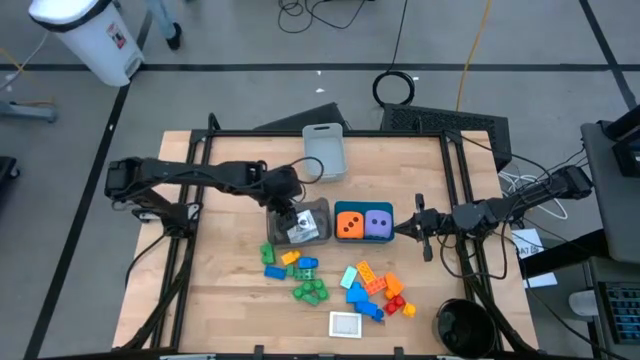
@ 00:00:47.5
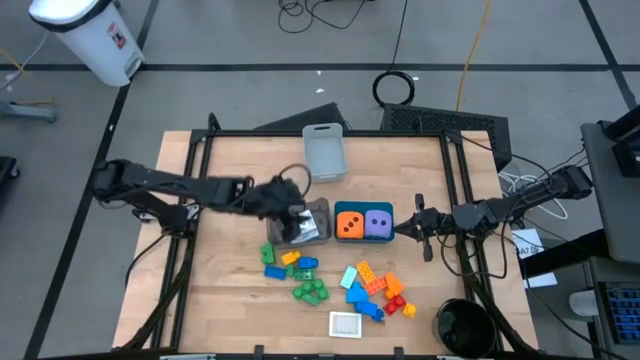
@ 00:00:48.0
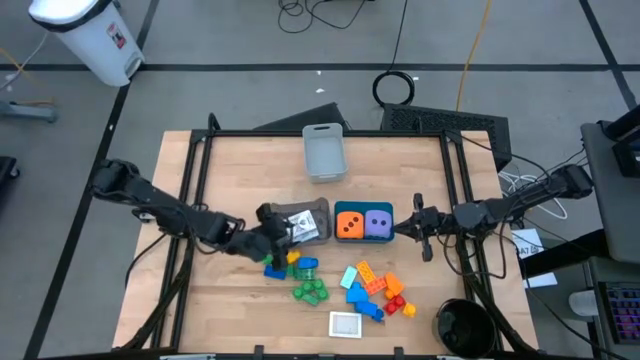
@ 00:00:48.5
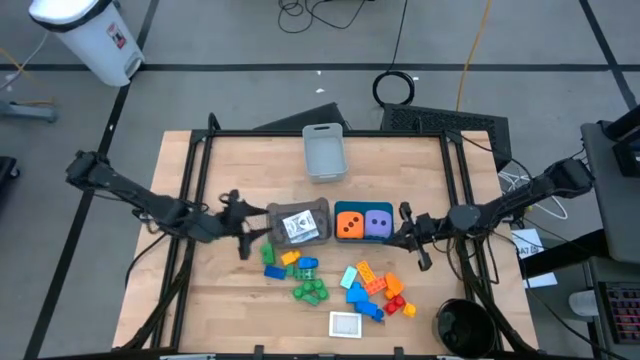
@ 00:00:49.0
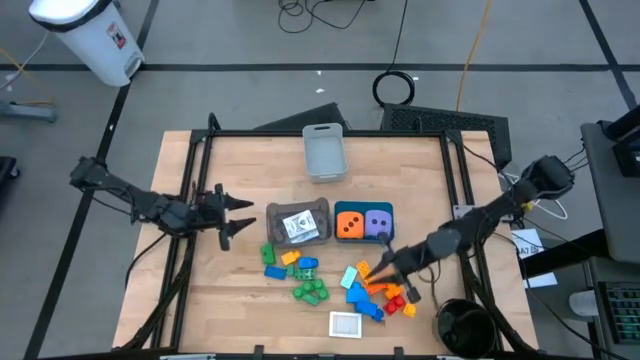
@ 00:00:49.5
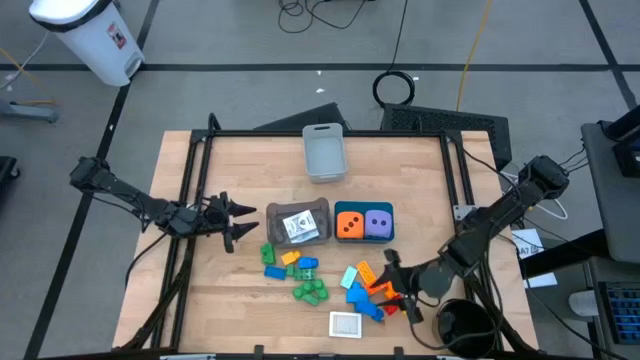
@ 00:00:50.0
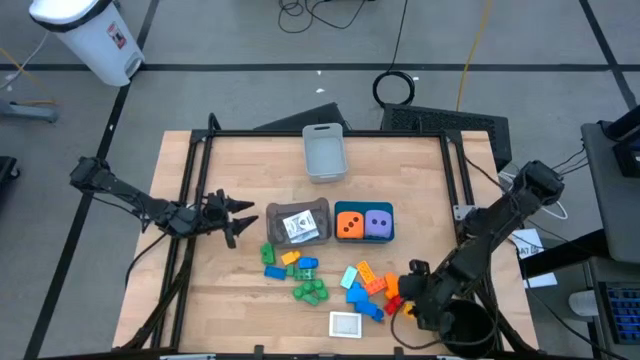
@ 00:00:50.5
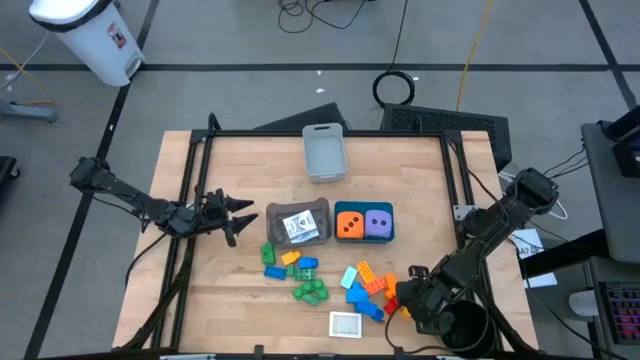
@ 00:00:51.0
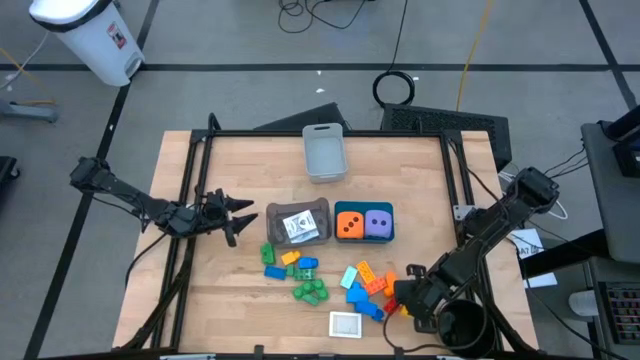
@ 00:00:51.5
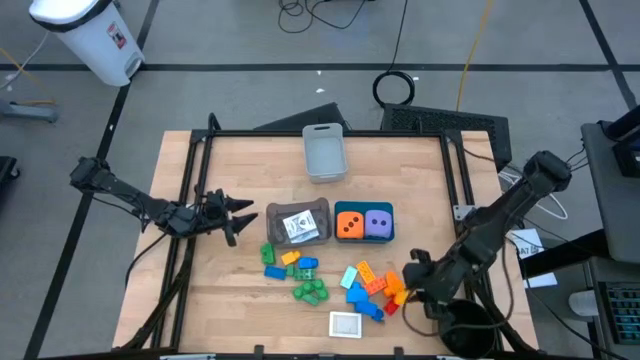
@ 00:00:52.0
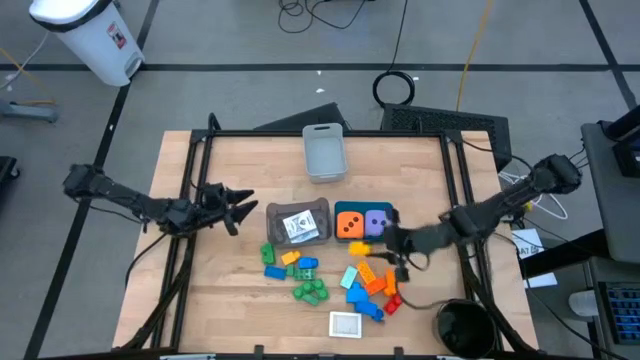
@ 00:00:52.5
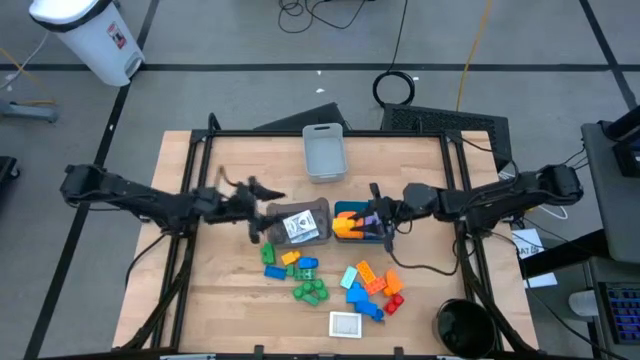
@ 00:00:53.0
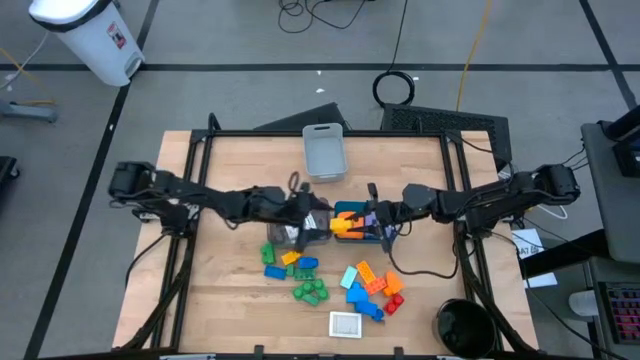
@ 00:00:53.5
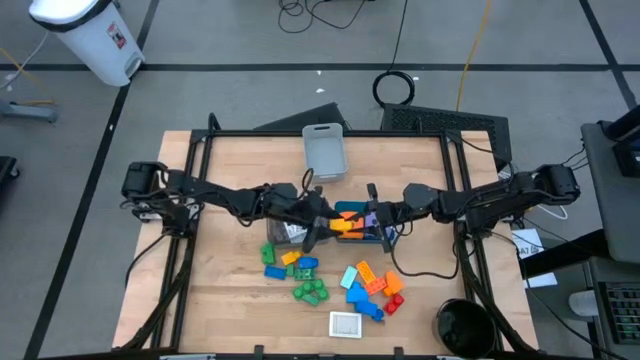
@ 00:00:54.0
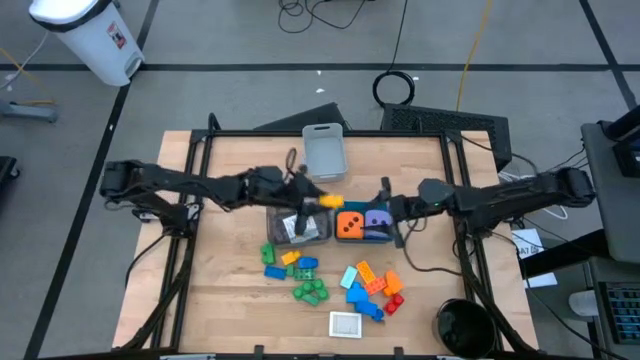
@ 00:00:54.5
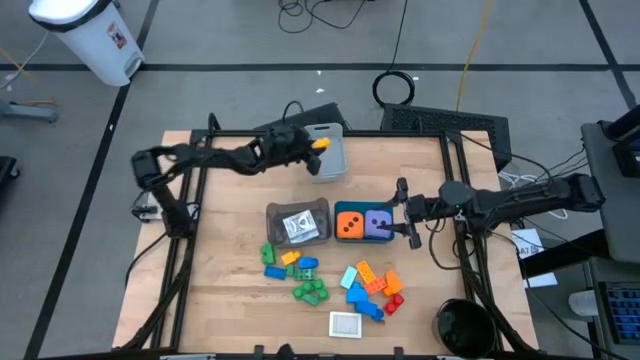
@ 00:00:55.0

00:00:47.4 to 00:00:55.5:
Task: Pick & Place Toys
Put the bottom yellow game piece into the gray bin

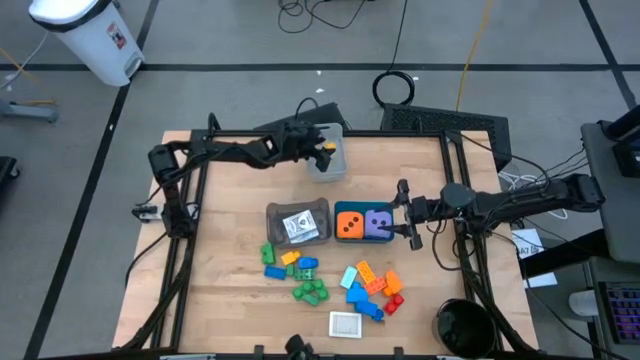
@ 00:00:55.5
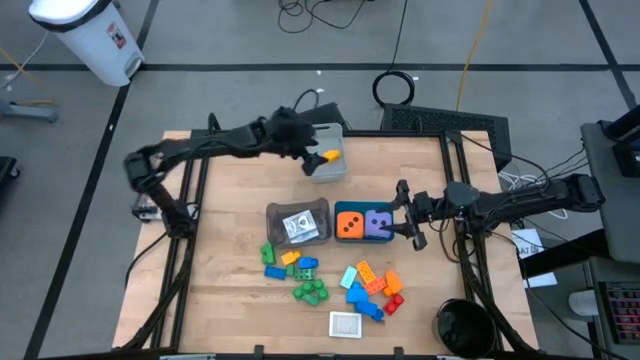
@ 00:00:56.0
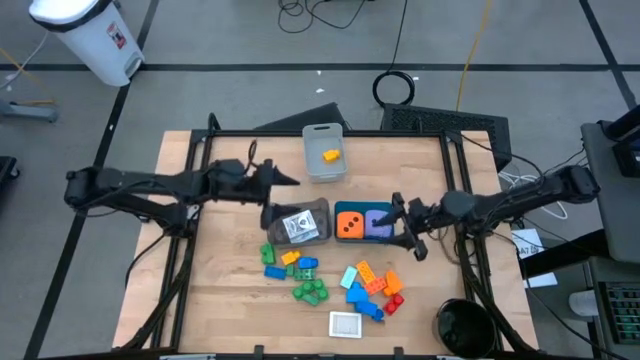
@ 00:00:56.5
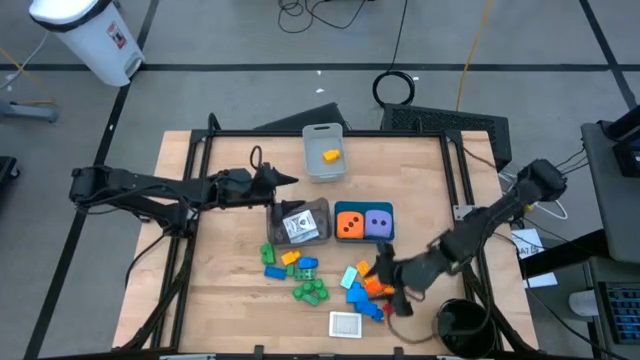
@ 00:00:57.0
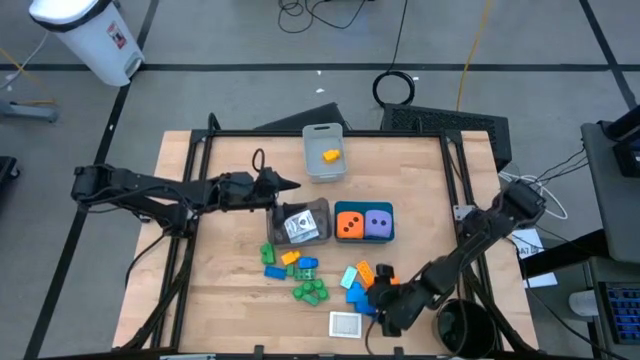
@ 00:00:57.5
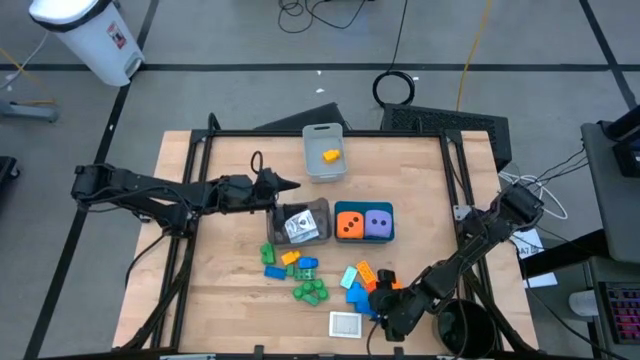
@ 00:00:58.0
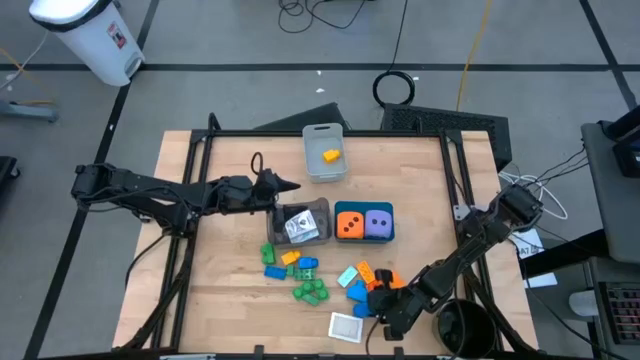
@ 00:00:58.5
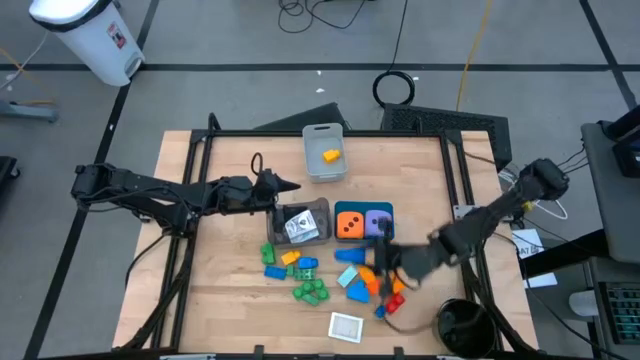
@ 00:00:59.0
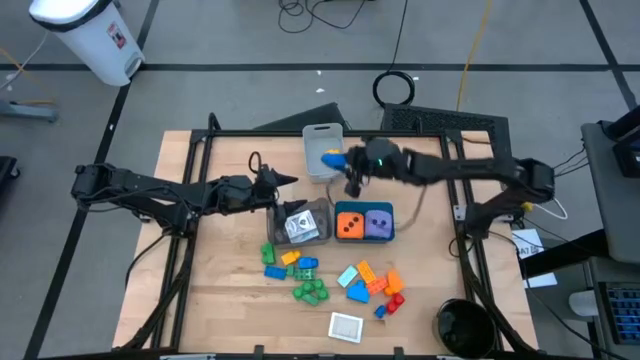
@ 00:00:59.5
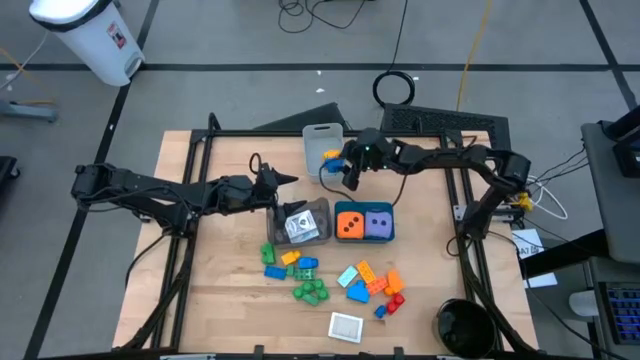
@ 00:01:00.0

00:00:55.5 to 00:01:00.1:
Put the blue game piece into the gray bin

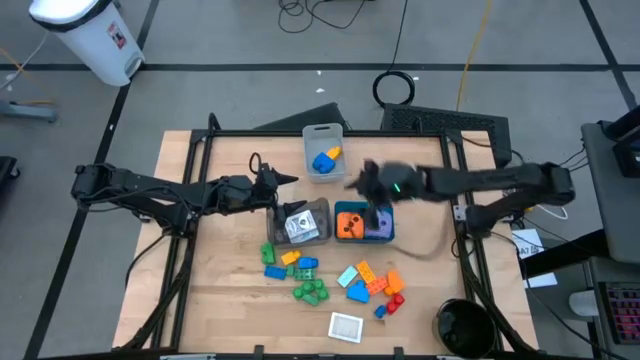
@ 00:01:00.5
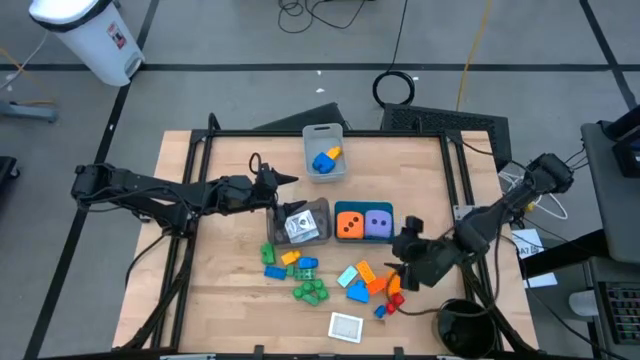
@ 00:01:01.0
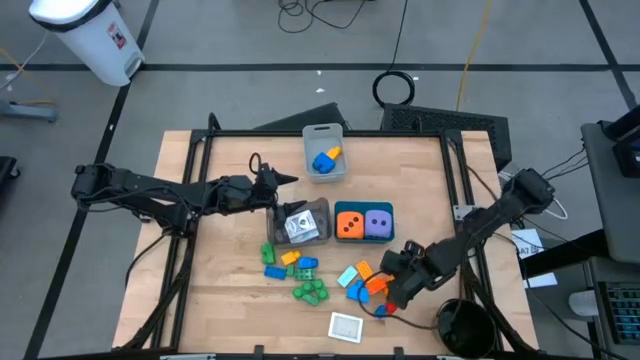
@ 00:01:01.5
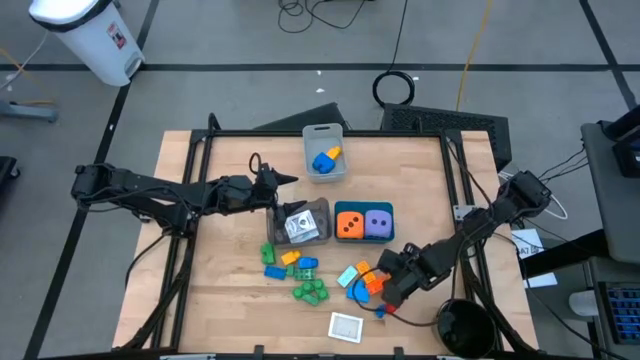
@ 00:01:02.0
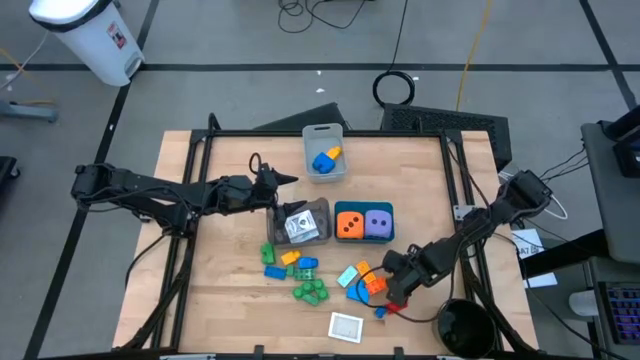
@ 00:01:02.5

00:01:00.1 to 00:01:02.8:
Put the right orange game piece into the gray bin

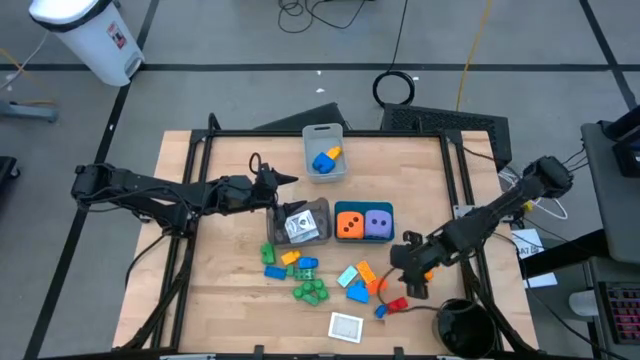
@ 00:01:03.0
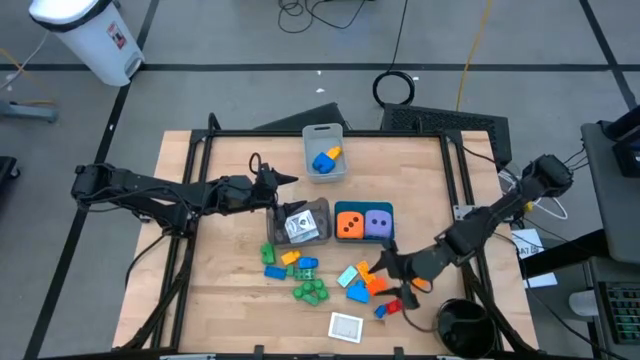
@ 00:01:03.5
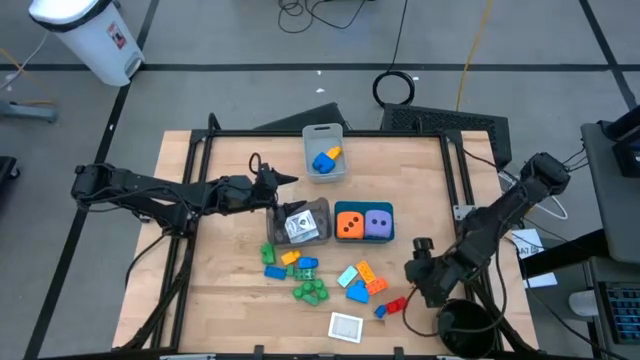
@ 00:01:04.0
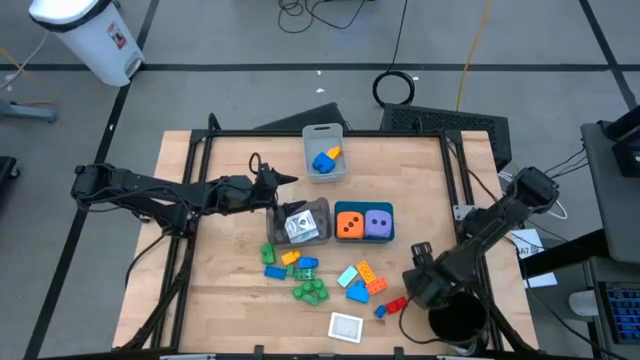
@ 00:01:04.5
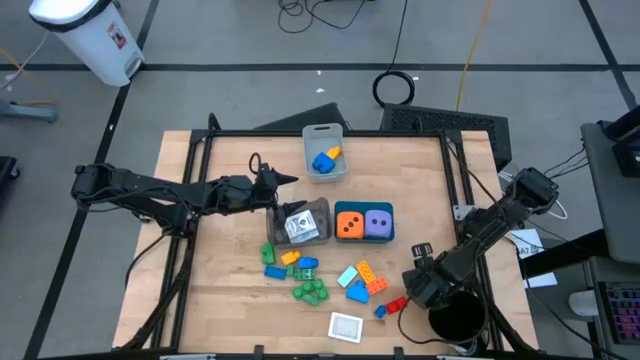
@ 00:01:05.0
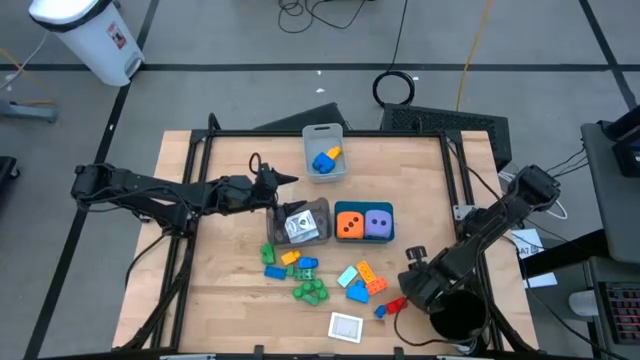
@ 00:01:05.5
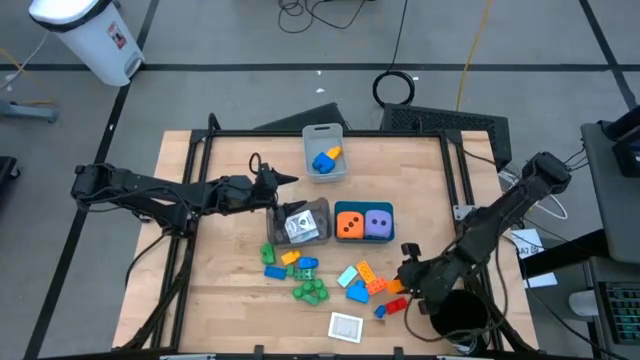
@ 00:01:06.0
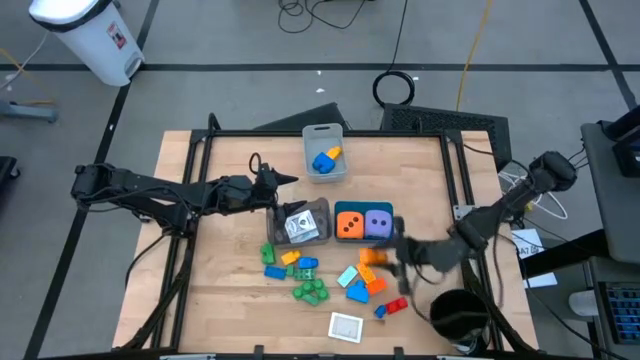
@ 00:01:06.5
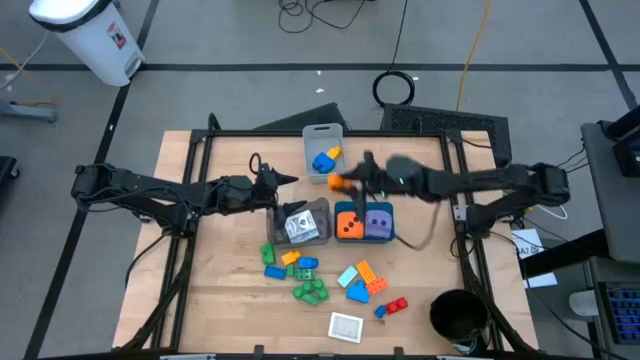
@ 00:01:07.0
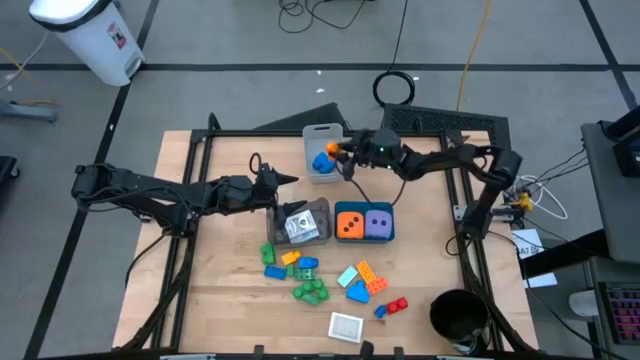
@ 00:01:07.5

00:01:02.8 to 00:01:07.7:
Put the right orange game piece into the gray bin
